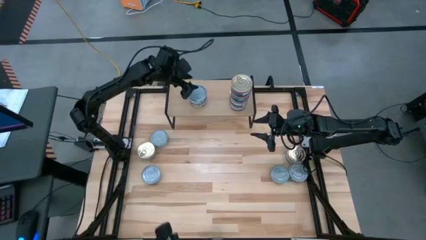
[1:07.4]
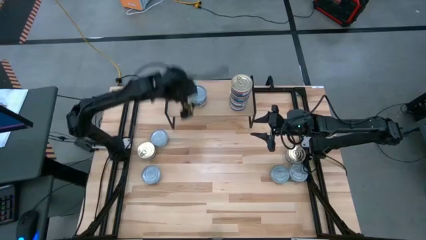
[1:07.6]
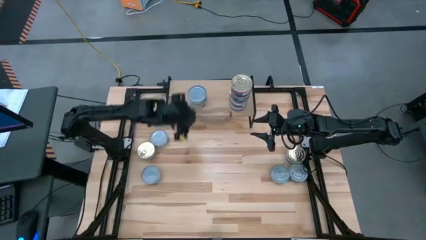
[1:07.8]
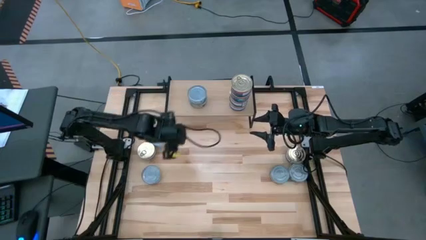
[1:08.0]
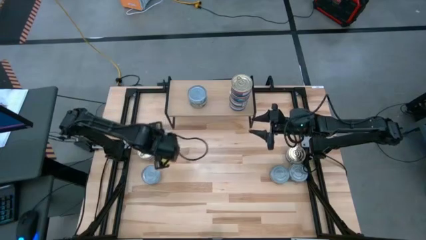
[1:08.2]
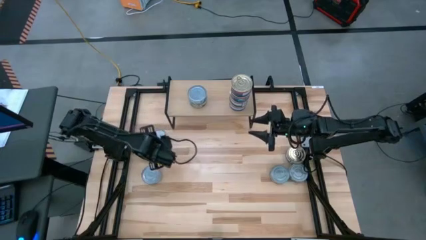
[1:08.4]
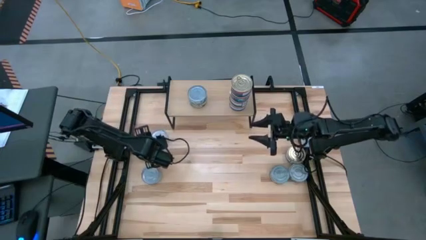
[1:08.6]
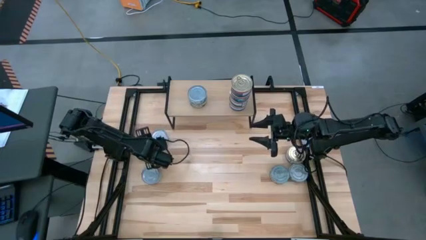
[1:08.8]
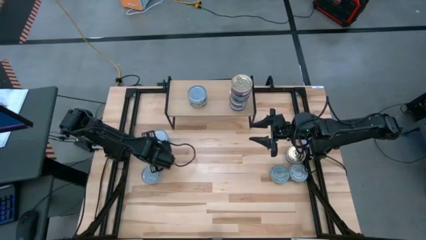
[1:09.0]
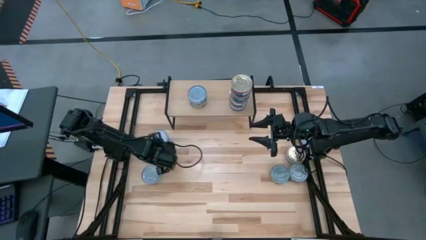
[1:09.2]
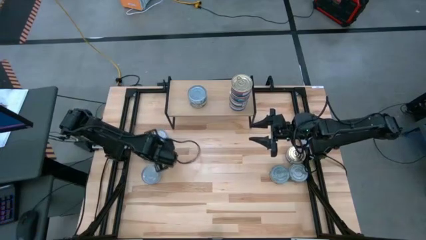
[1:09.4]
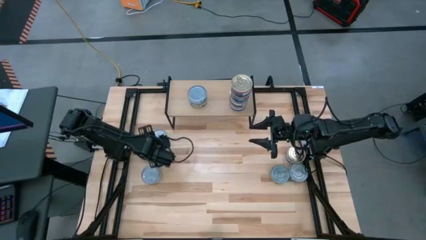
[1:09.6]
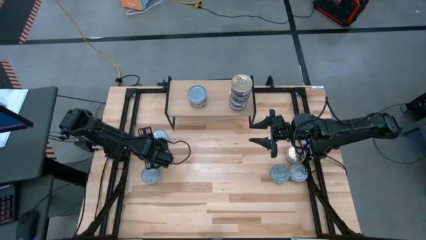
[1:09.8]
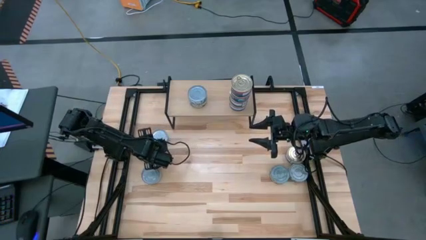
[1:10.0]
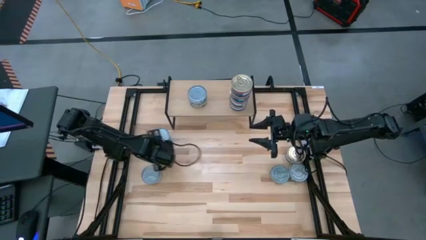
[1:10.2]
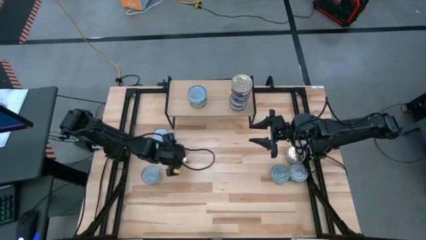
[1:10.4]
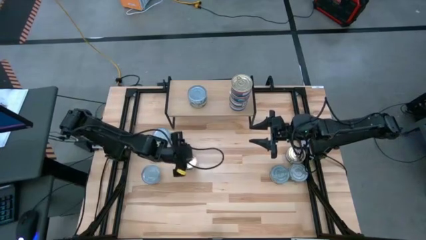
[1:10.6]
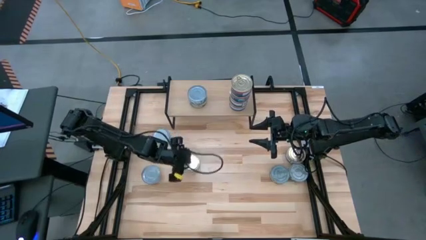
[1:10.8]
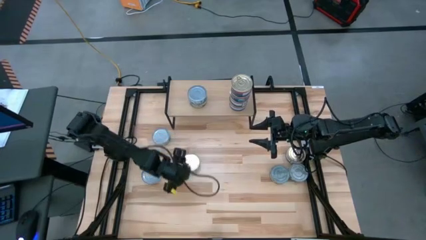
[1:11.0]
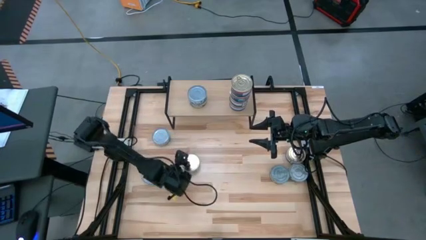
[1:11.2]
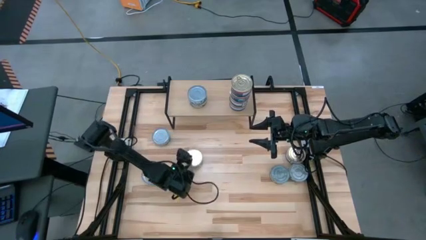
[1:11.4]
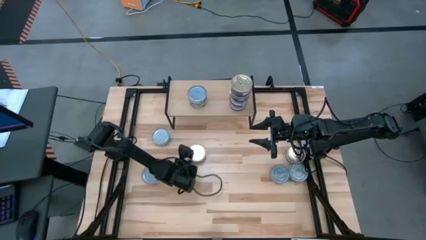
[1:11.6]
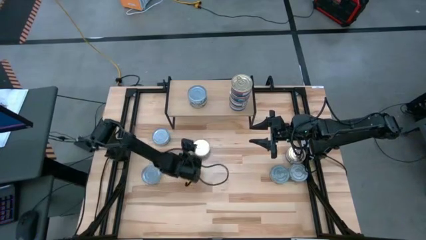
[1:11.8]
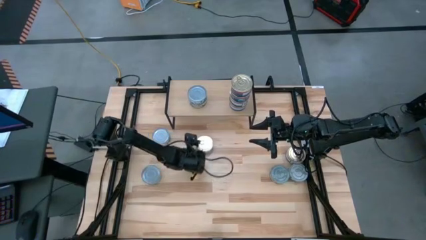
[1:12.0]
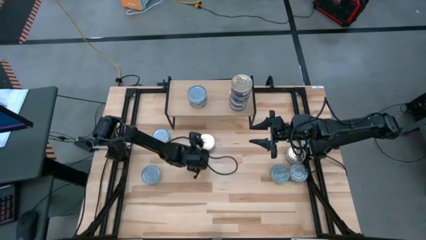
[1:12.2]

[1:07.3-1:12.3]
Task: Stack canned seafood by type on shelf
Move the pink and blue tuna can to the center of the table

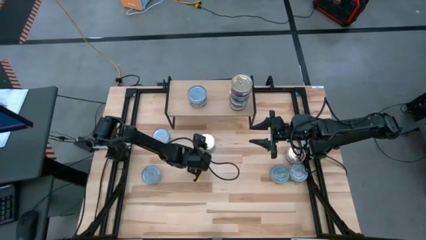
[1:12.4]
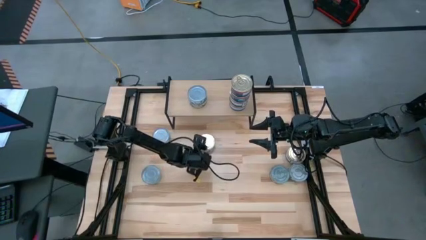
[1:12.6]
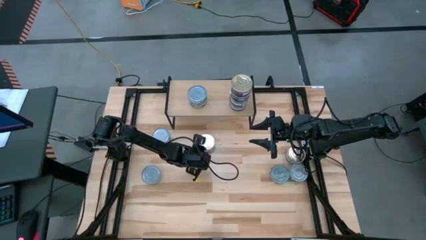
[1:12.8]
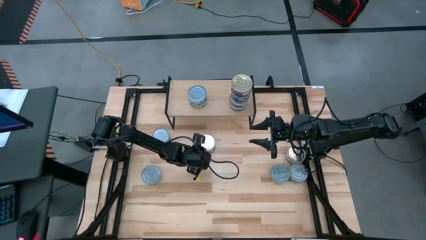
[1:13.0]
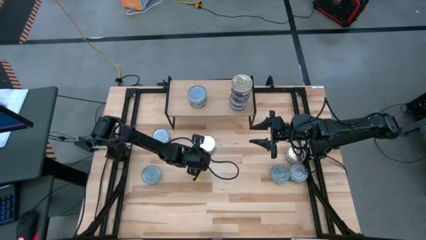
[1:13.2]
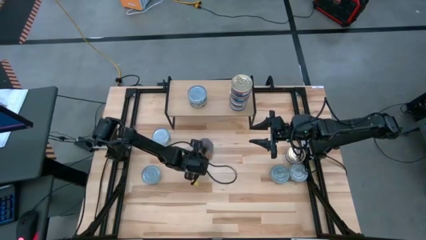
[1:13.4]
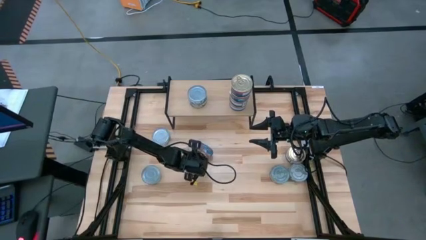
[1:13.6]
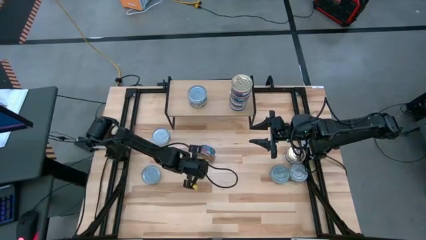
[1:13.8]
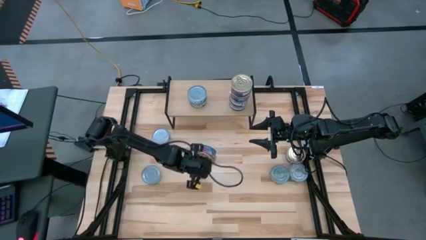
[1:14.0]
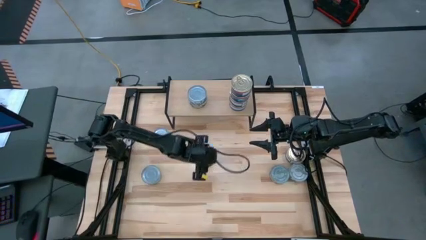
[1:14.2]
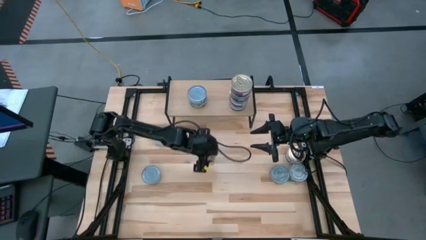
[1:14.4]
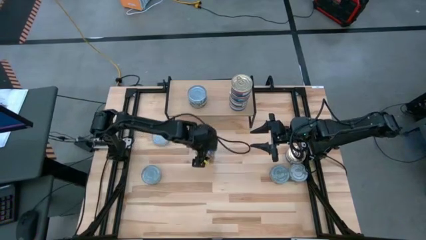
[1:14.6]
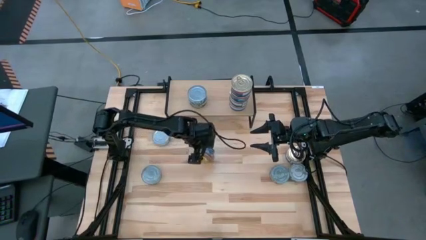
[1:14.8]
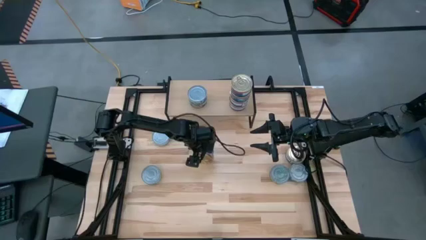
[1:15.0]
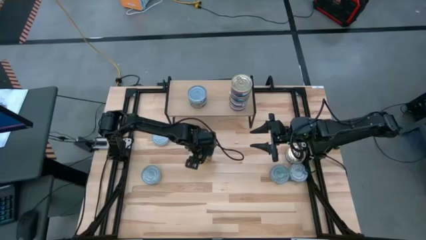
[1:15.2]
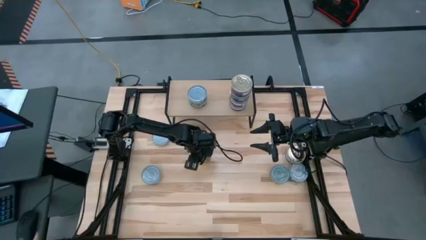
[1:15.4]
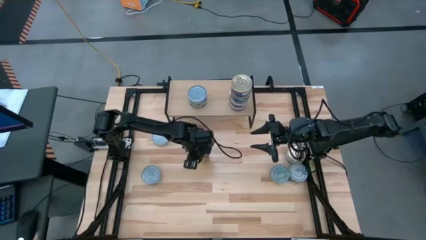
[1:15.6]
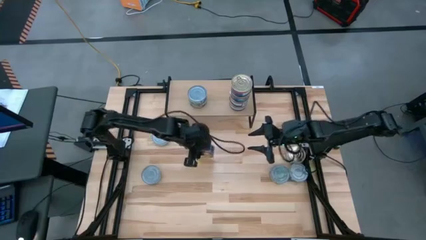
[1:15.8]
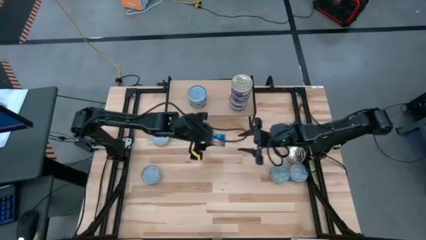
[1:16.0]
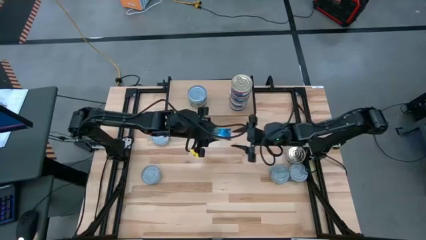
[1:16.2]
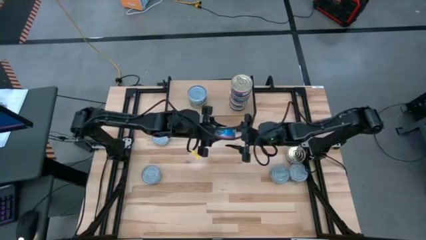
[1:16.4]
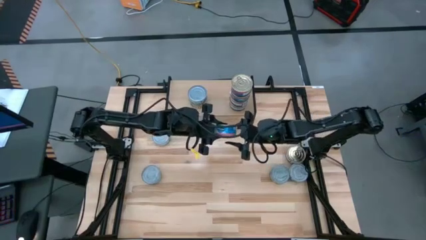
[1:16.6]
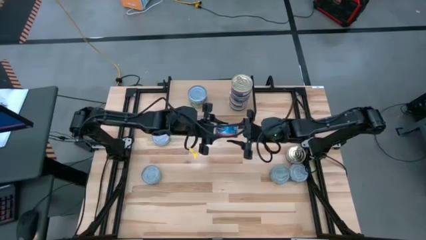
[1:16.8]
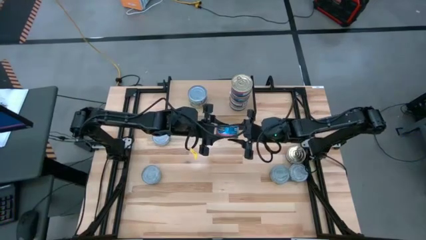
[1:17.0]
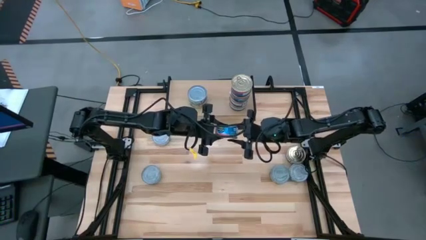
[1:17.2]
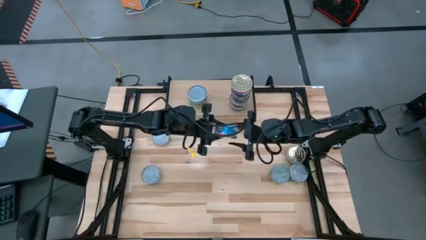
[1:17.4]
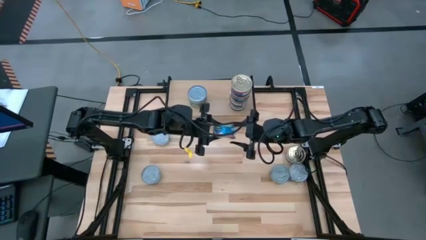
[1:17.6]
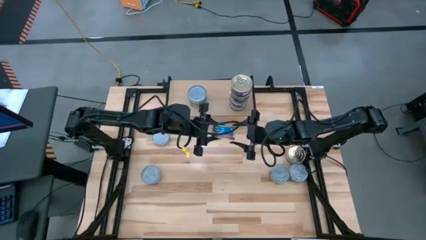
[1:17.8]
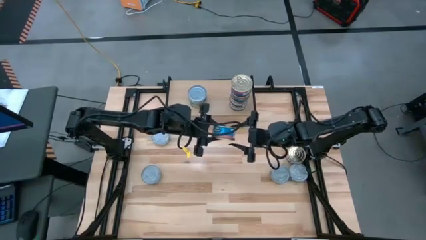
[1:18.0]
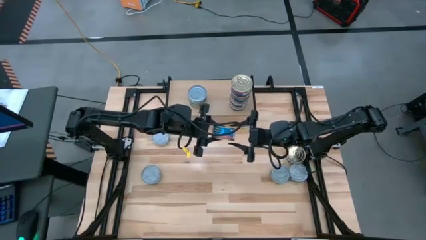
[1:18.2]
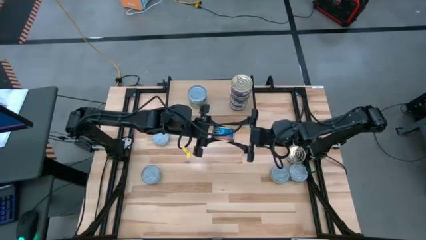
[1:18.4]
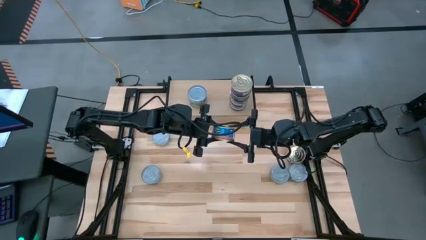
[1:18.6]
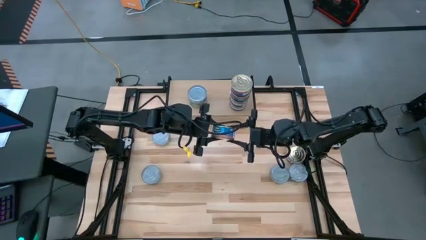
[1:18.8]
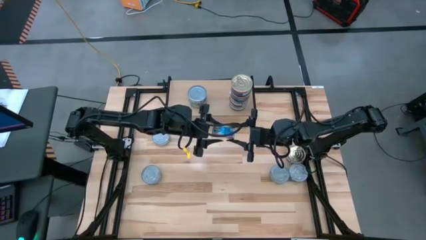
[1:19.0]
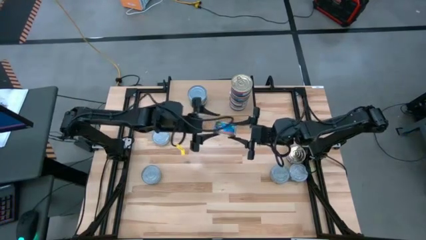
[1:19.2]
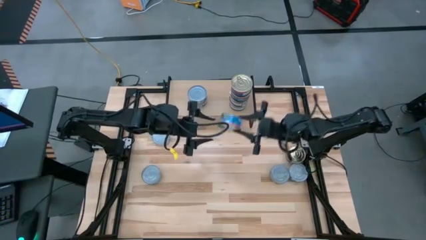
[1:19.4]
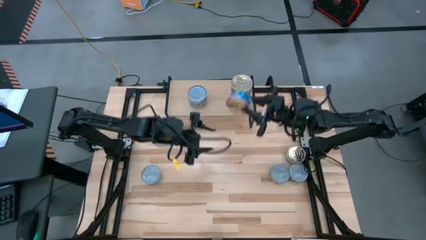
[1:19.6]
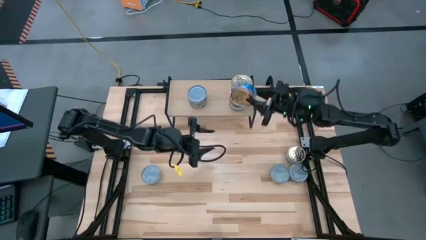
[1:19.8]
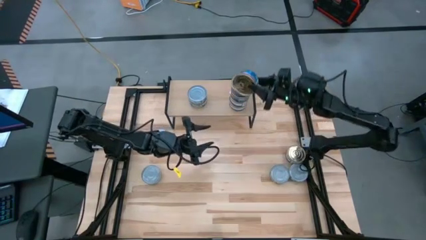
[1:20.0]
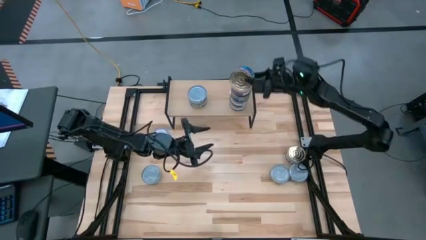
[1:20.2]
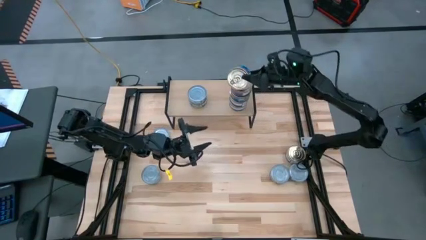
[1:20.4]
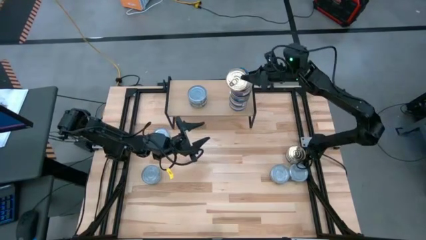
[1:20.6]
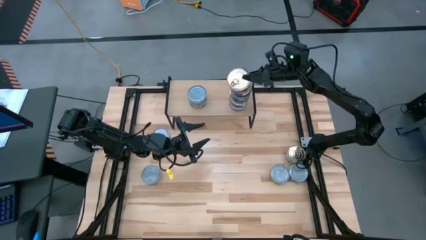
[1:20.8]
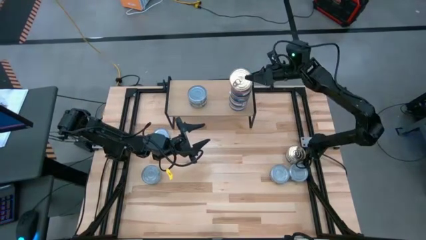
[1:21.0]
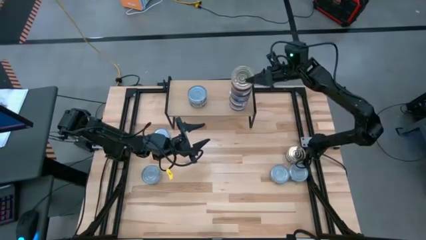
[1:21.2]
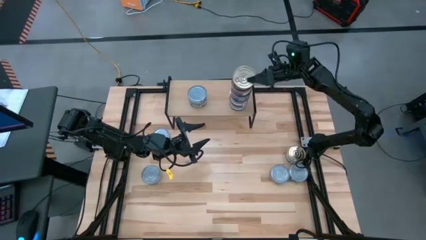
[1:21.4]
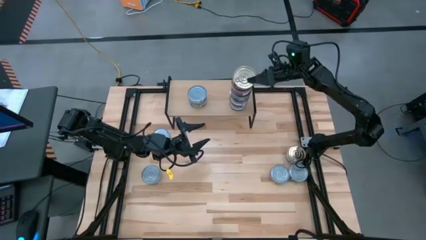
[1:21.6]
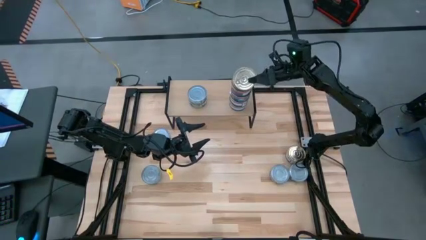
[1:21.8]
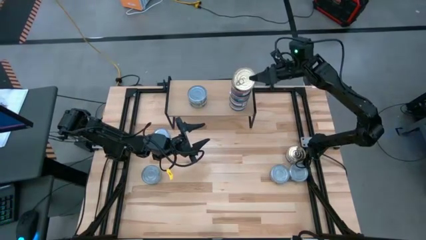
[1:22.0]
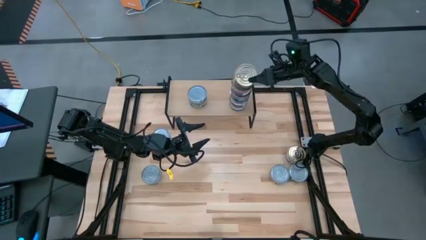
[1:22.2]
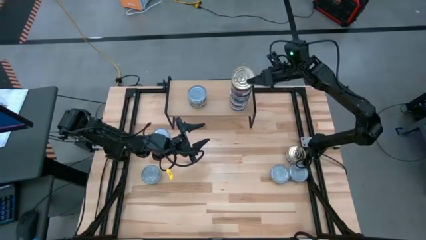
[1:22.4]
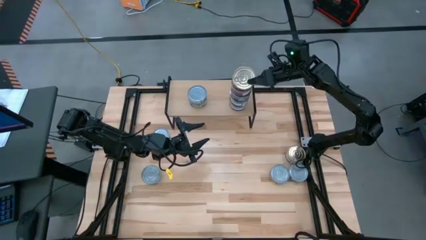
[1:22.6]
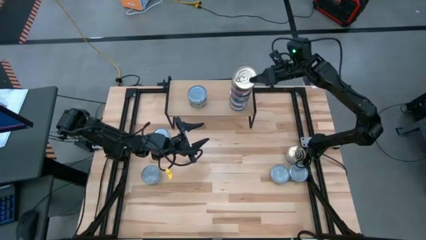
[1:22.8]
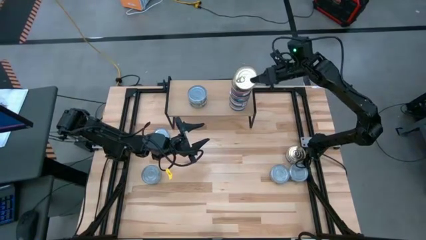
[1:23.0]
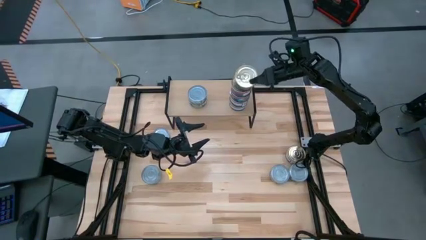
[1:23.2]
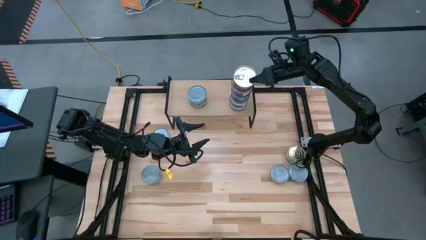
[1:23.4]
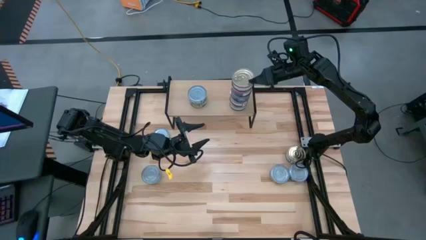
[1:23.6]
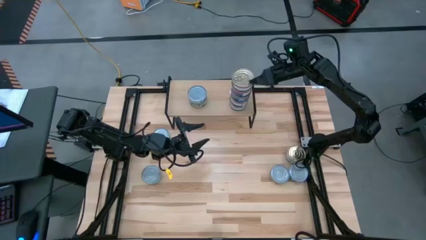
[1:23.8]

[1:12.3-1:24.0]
Stack the pink and blue tuna can on top of the pink and blue tuna can on the shelf

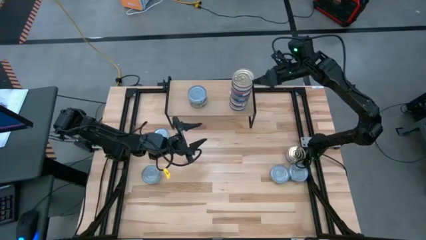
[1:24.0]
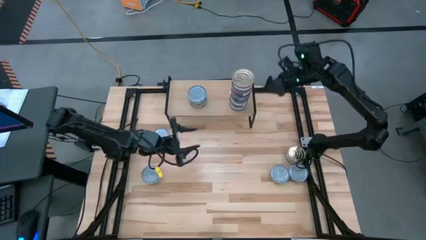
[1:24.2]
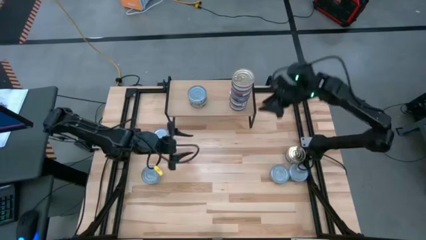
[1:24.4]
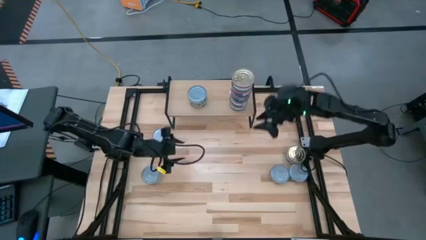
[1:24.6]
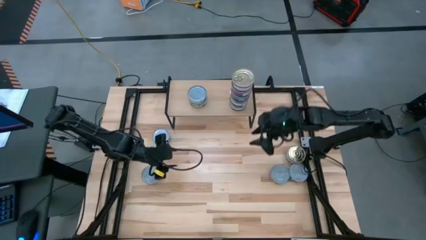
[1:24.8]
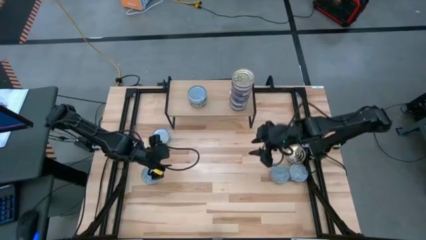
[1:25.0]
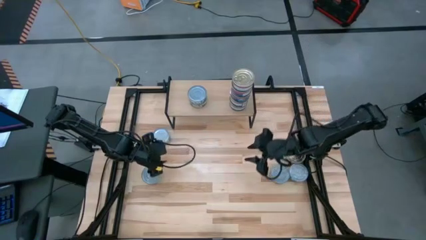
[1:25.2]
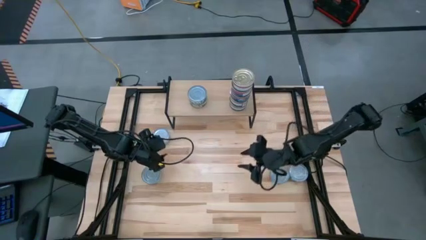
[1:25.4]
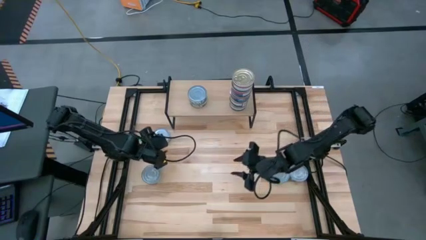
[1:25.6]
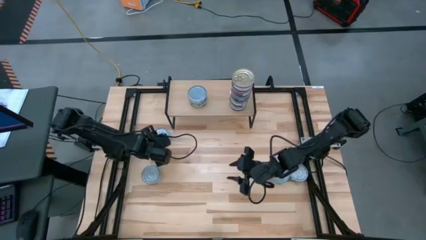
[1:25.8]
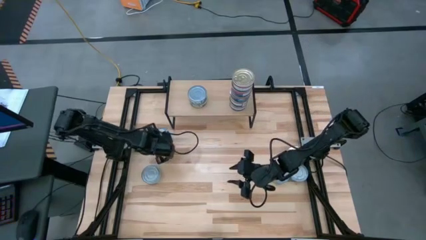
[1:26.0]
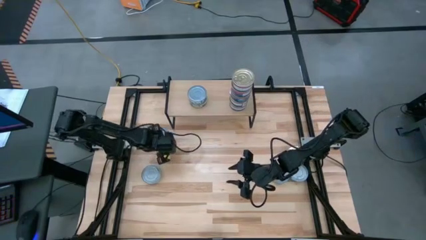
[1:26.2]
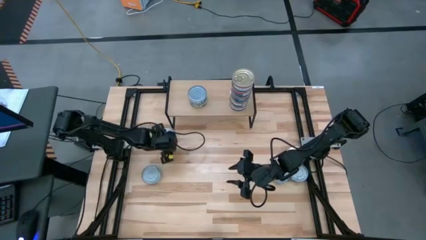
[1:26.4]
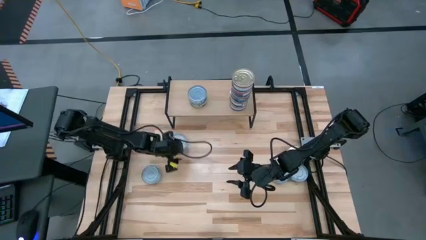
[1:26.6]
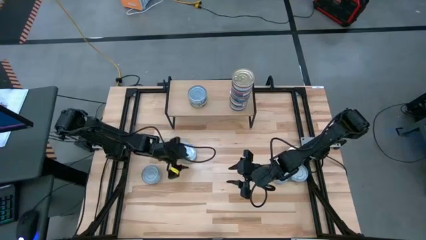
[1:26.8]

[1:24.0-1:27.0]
Move the green tuna can to the center of the table
